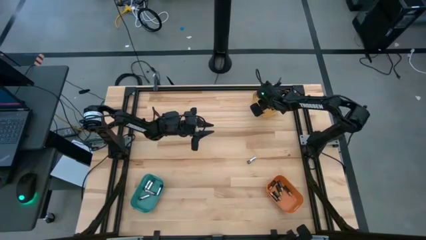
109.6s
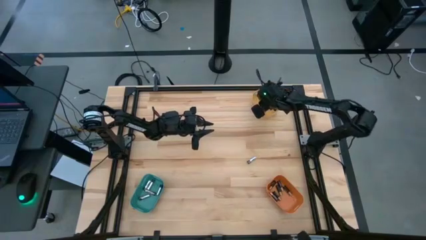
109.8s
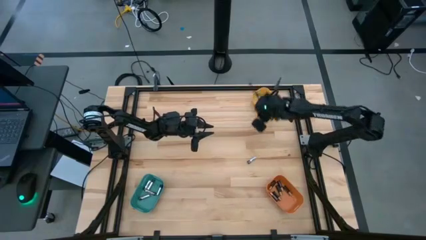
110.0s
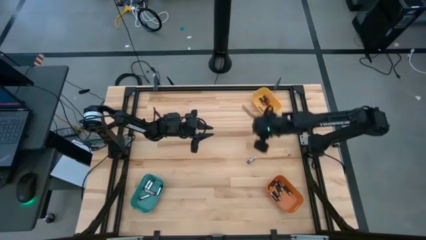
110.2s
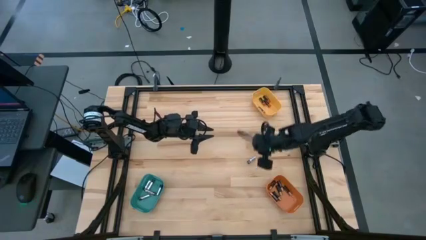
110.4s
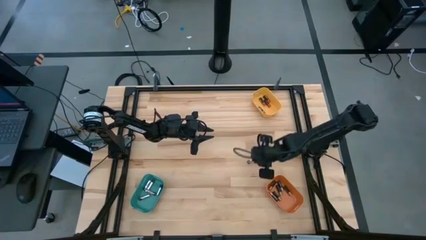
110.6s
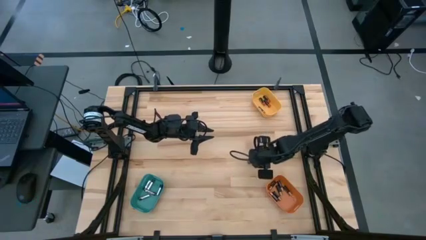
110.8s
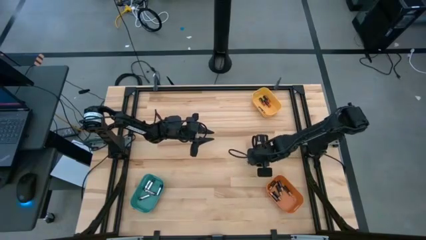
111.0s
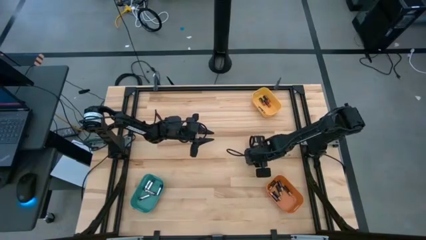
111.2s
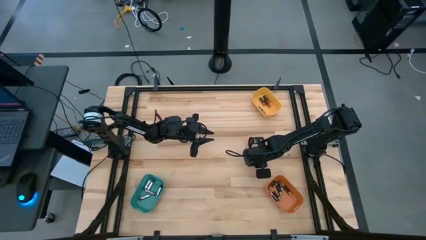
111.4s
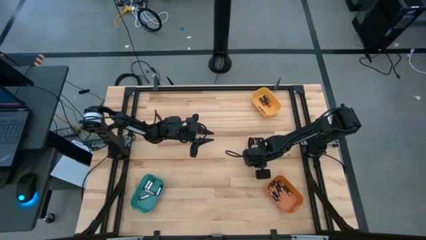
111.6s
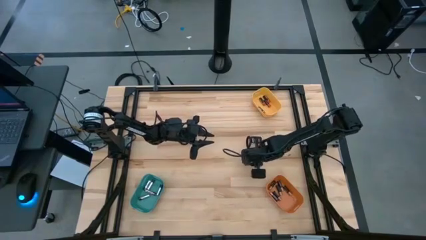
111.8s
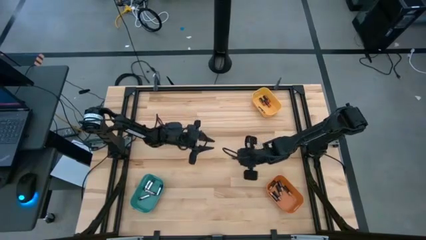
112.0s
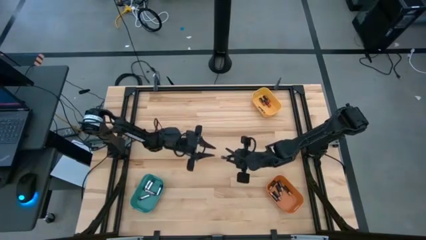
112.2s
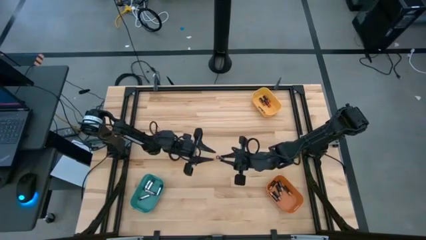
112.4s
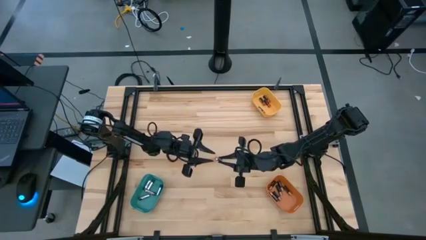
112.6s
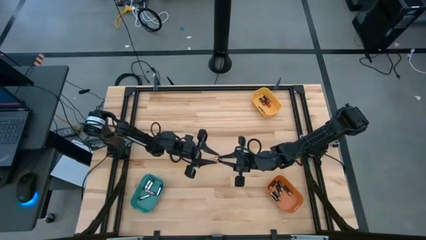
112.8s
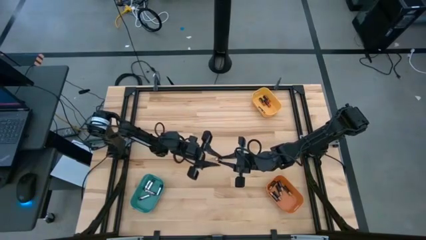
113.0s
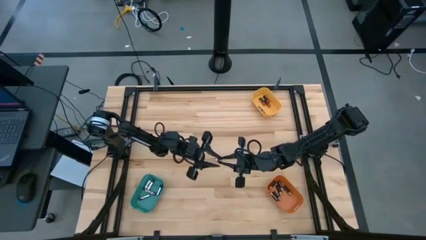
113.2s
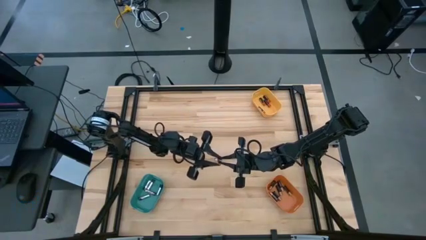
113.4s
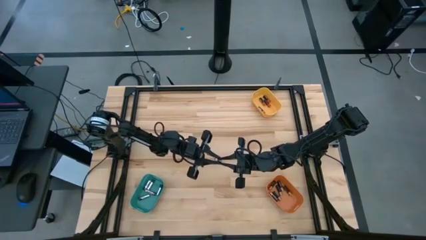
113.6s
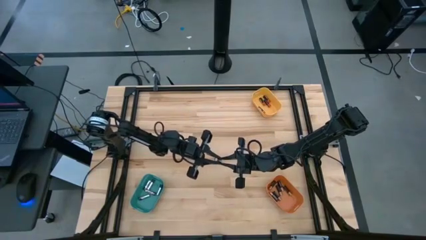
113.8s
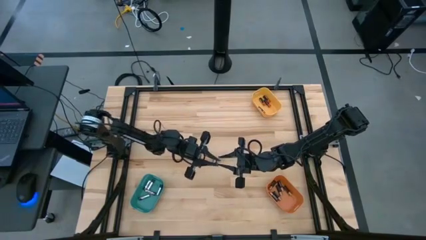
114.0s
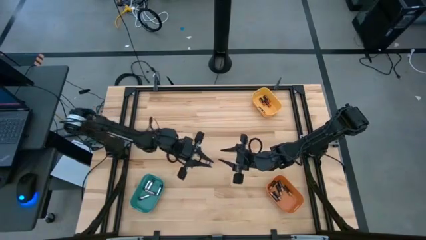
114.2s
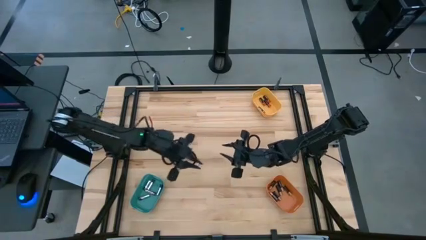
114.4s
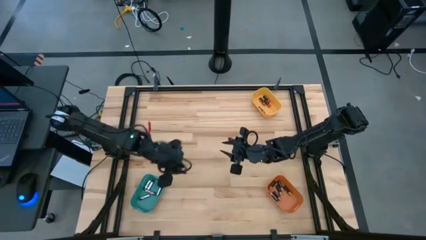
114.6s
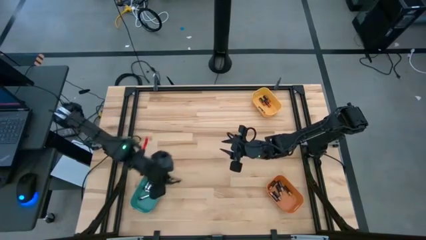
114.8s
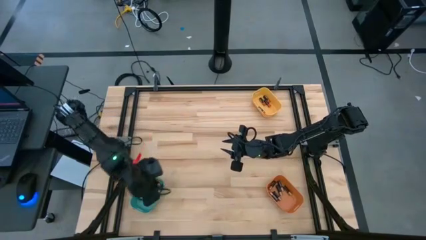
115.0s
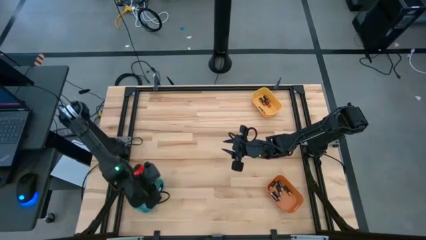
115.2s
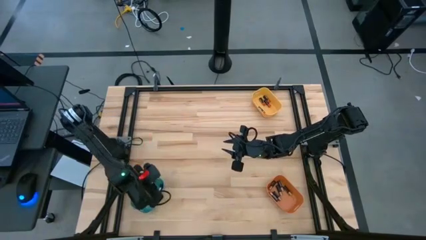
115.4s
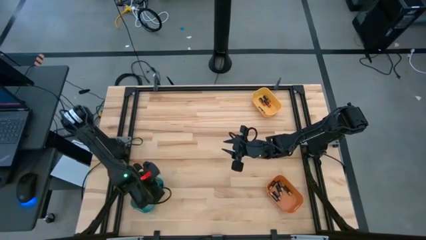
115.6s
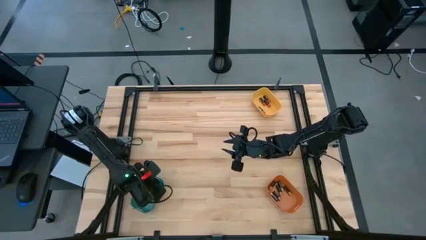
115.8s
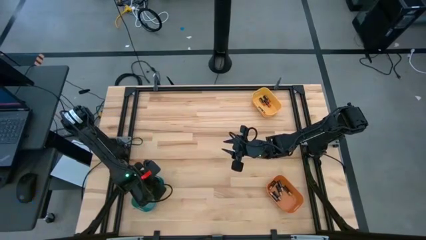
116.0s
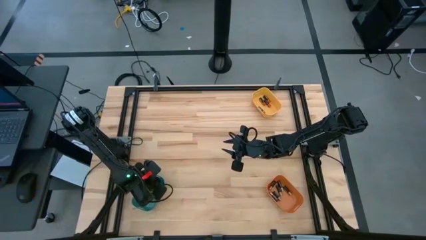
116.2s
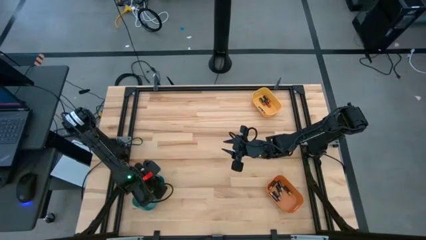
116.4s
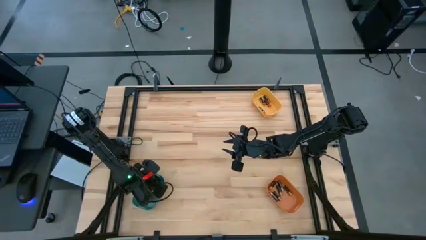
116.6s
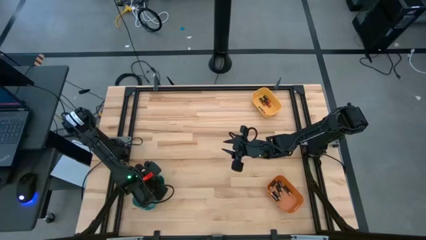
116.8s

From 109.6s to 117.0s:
Task: Sort batteries
Put the silver battery into the green bin

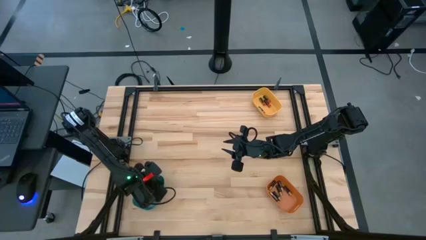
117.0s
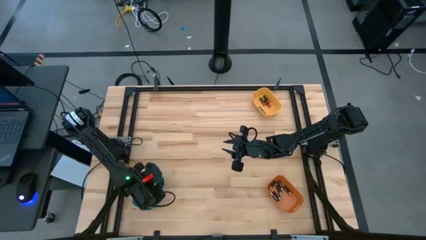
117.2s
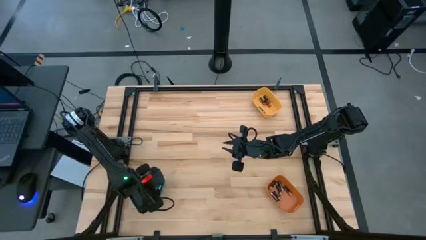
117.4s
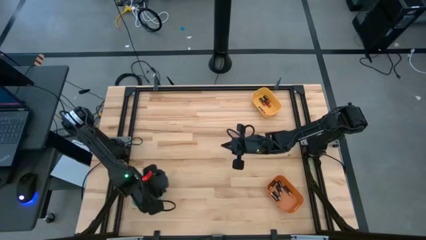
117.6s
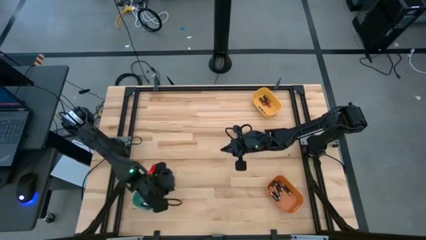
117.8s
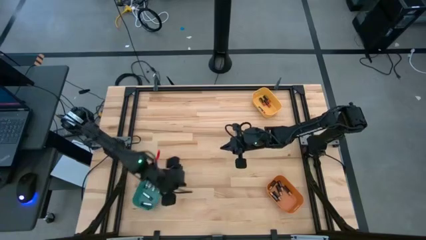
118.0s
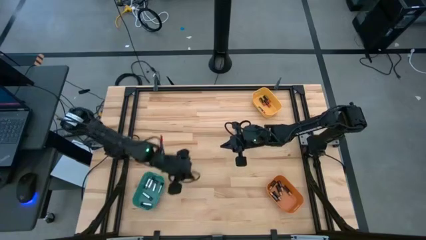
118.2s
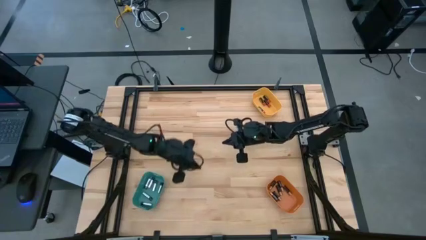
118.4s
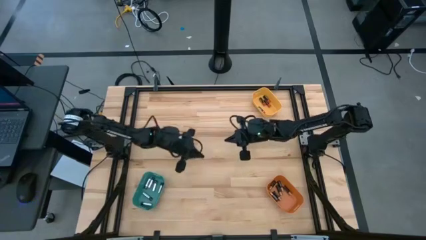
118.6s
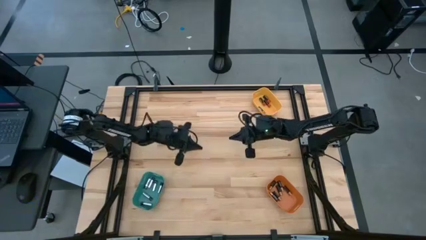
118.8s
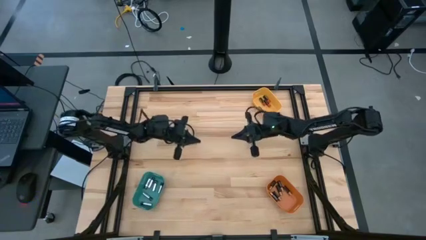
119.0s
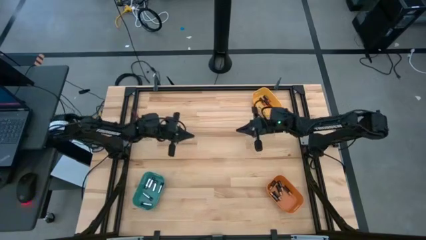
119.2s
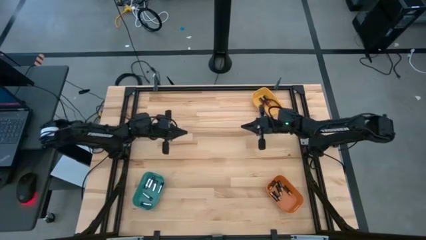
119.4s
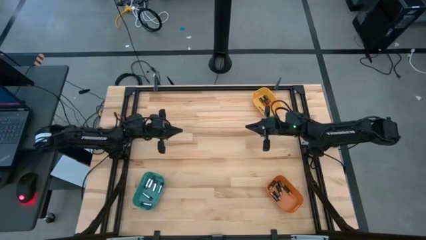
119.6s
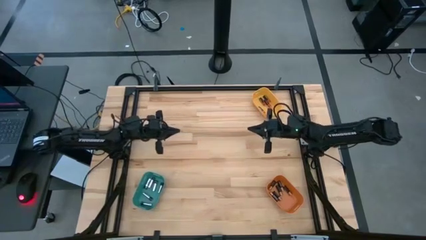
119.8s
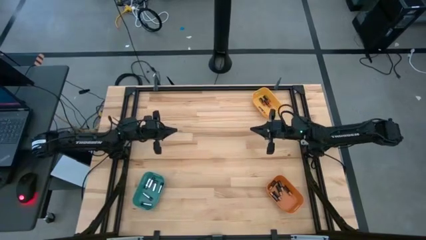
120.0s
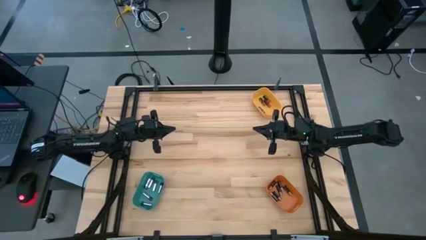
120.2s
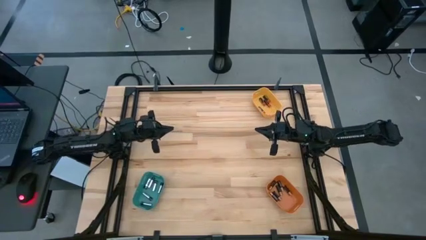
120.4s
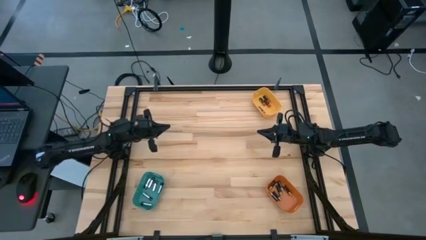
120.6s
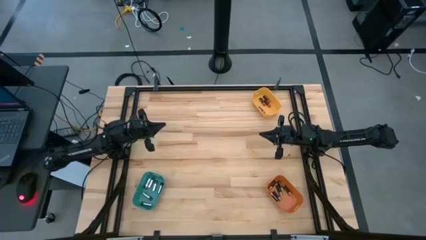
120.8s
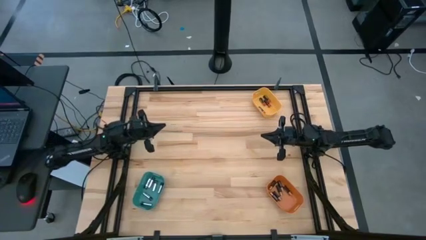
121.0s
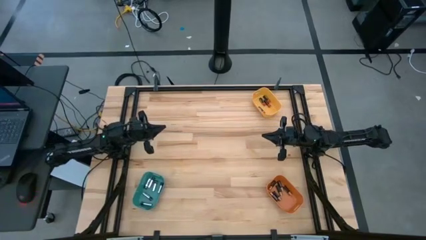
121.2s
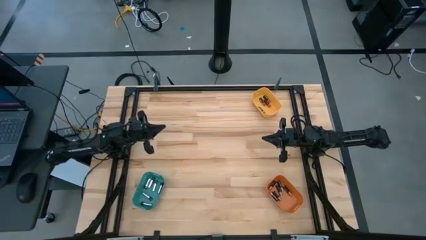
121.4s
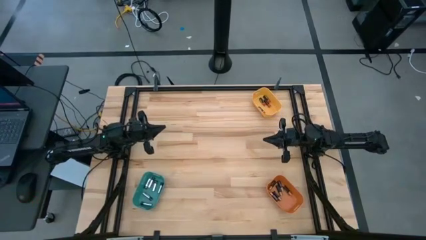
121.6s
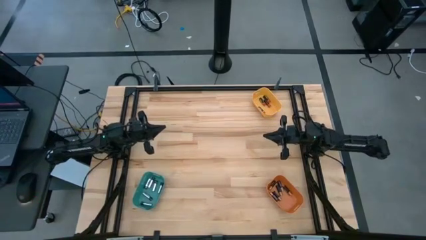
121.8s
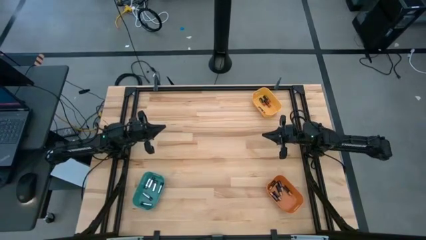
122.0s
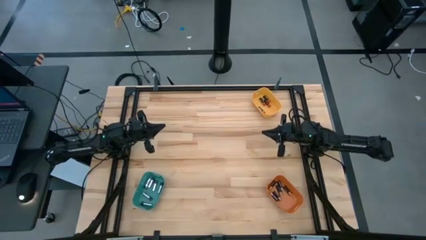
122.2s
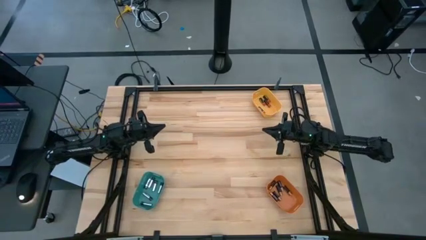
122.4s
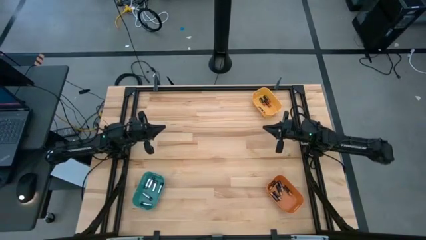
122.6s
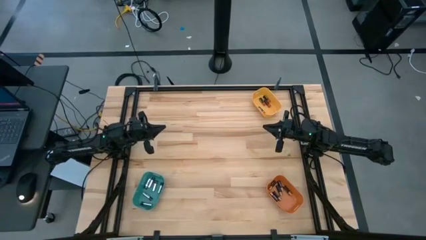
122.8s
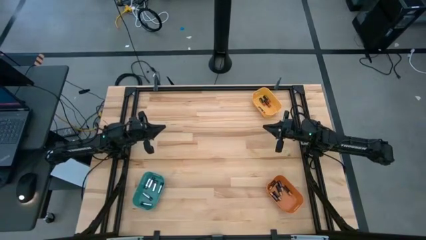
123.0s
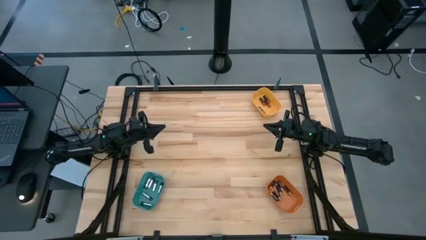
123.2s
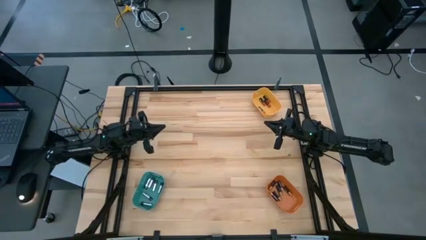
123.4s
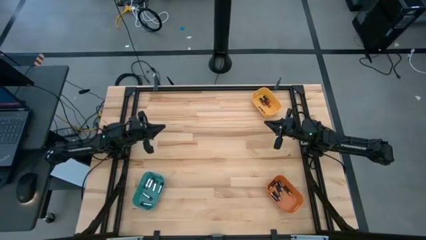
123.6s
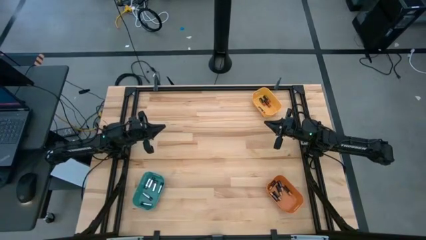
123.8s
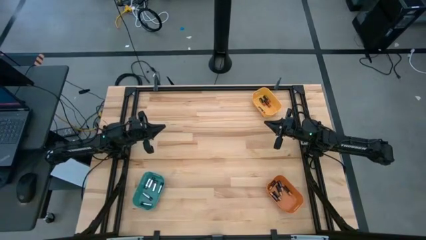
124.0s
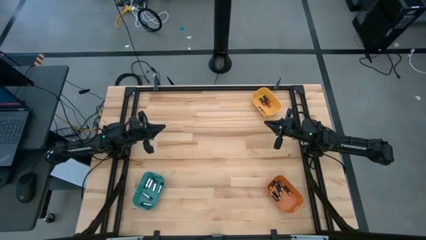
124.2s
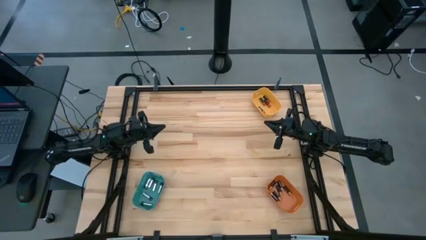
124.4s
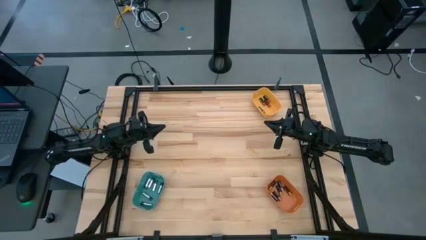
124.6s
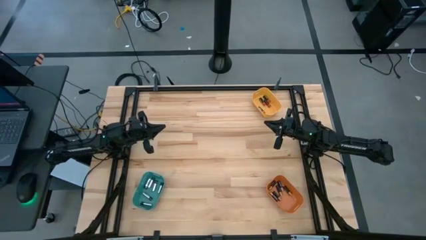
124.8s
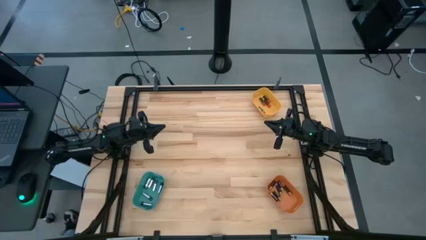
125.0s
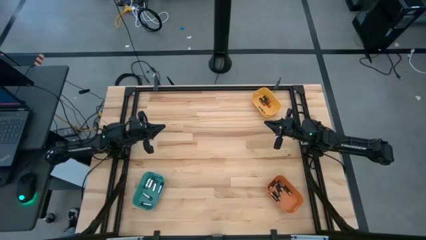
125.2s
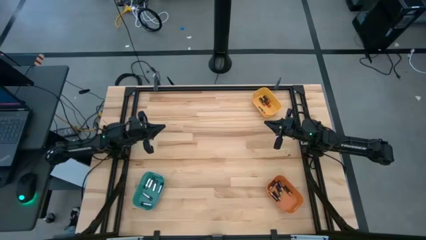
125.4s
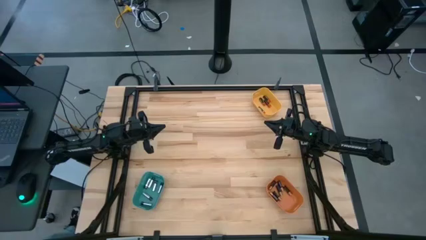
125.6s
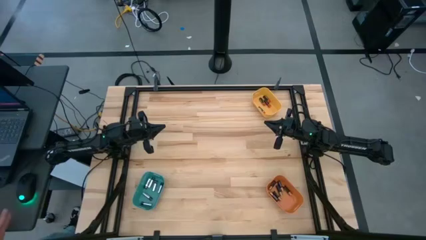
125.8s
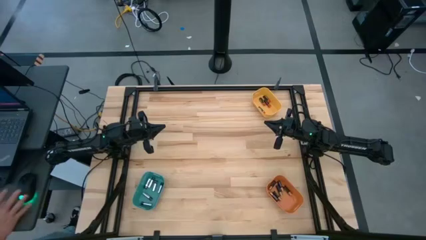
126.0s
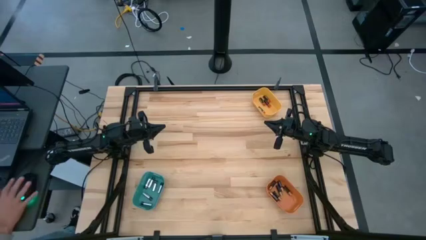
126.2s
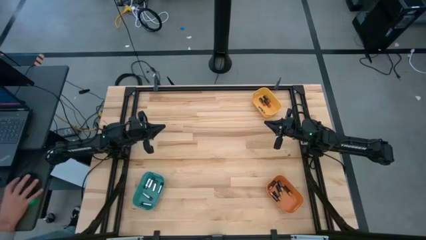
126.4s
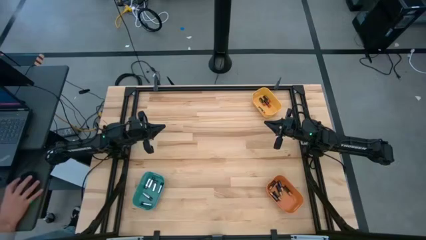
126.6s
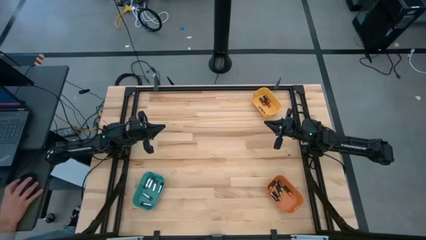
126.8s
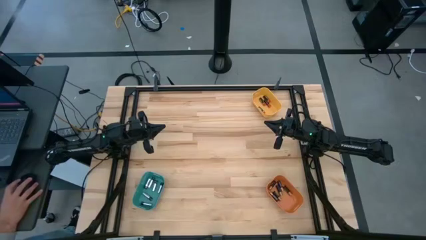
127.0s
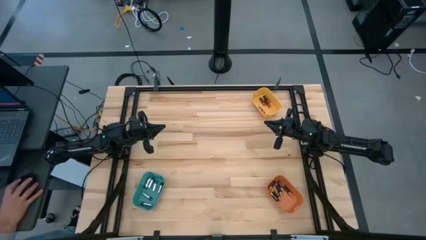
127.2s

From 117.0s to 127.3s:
Return to Home Position
